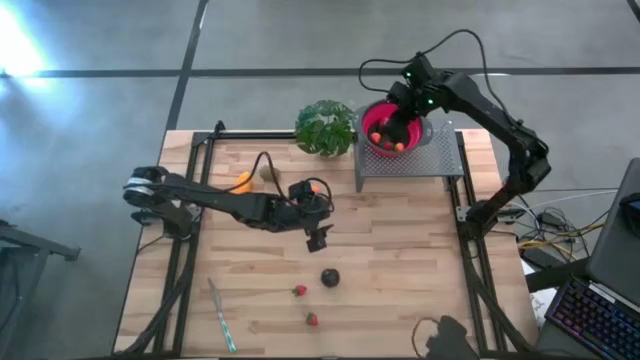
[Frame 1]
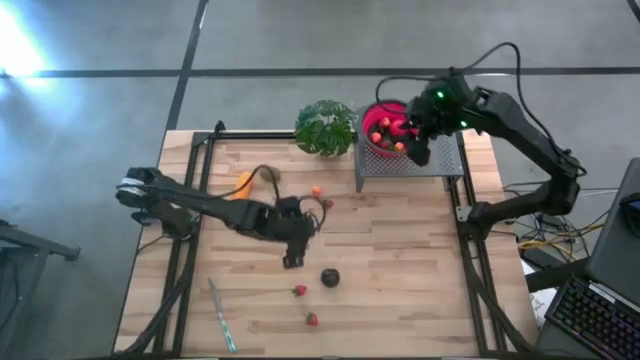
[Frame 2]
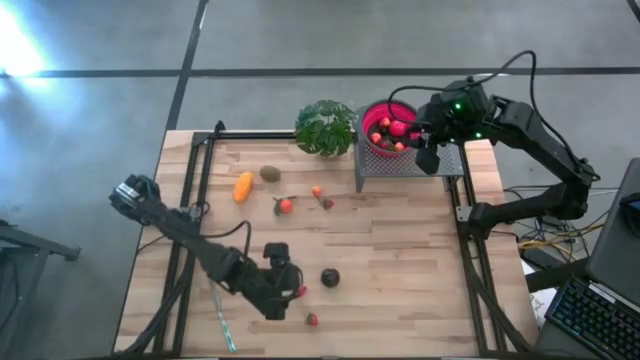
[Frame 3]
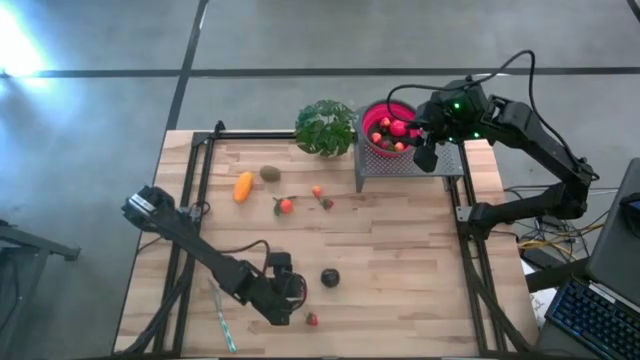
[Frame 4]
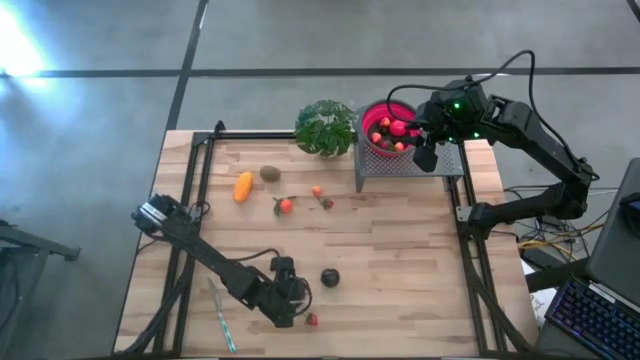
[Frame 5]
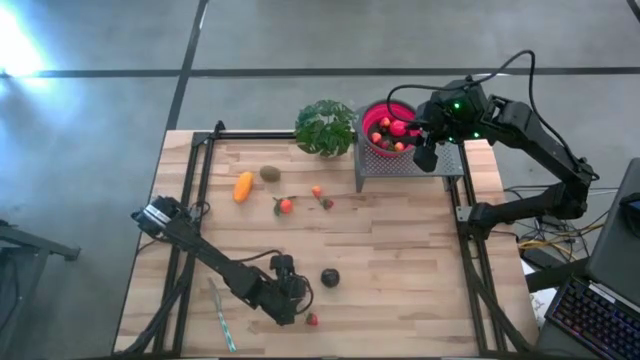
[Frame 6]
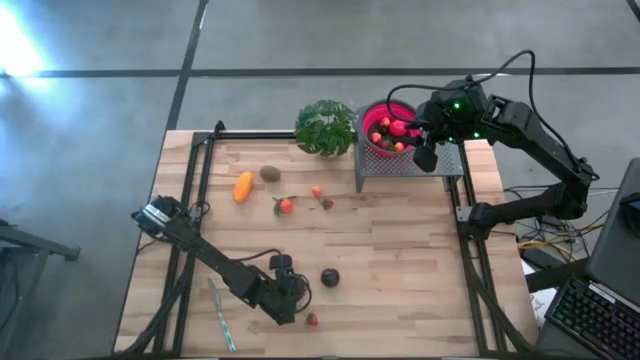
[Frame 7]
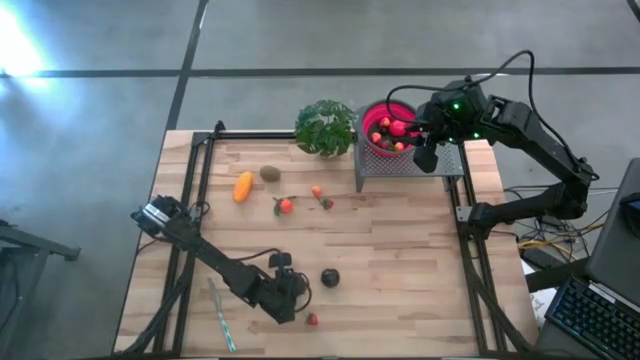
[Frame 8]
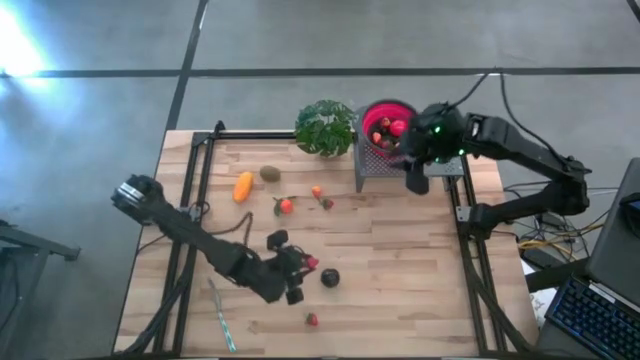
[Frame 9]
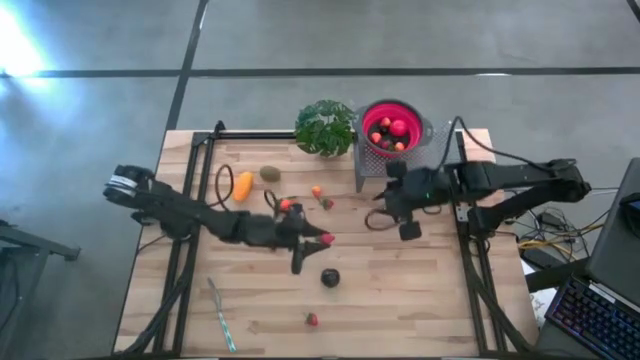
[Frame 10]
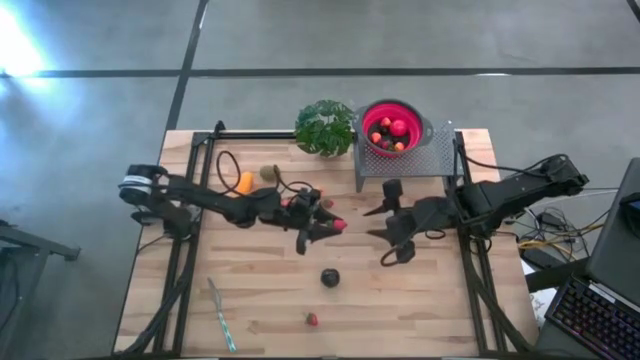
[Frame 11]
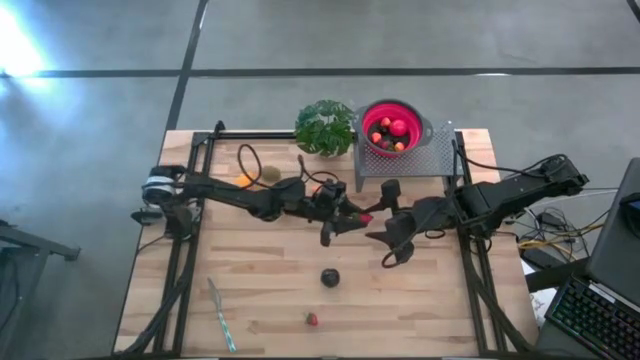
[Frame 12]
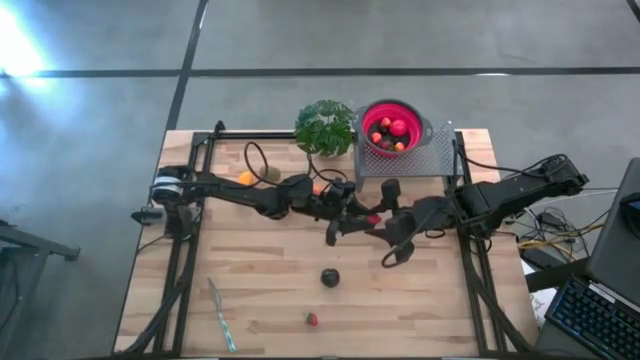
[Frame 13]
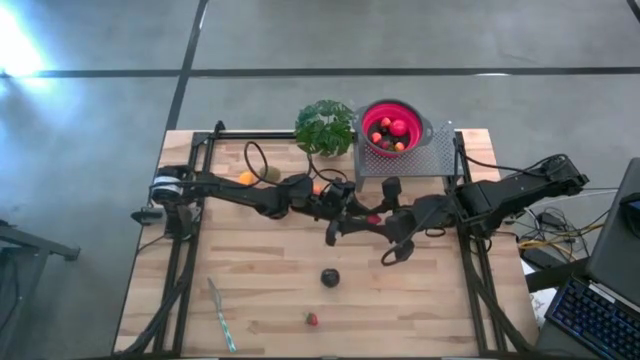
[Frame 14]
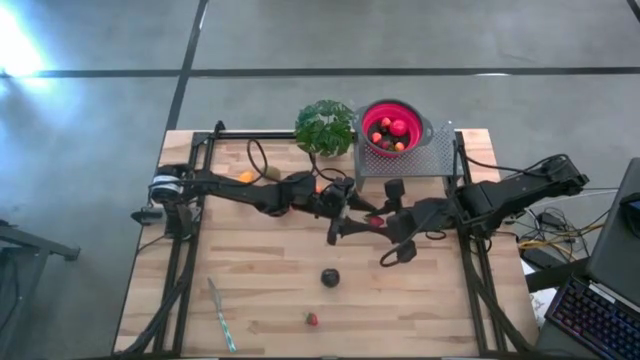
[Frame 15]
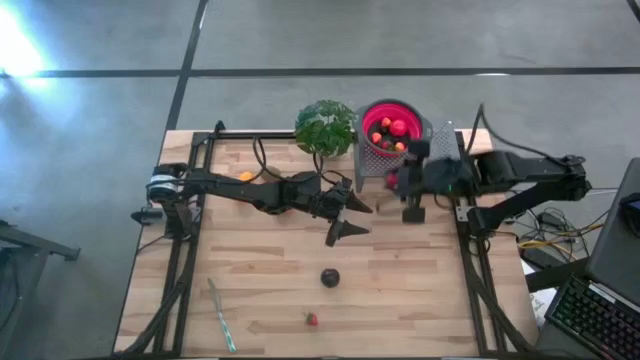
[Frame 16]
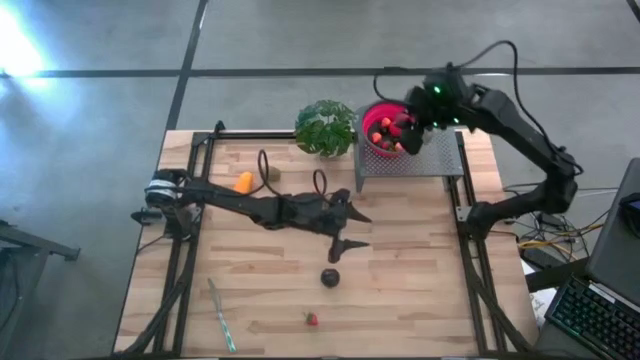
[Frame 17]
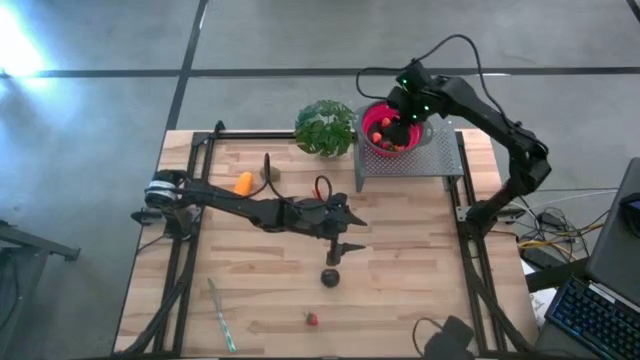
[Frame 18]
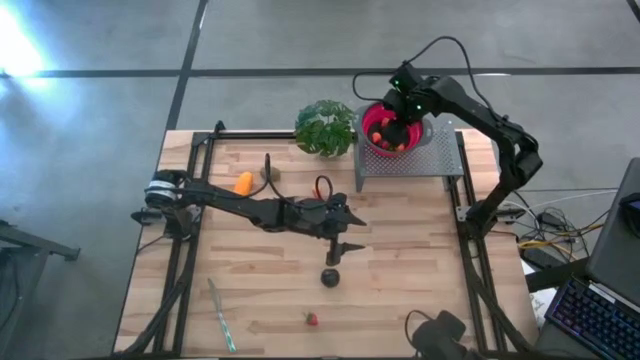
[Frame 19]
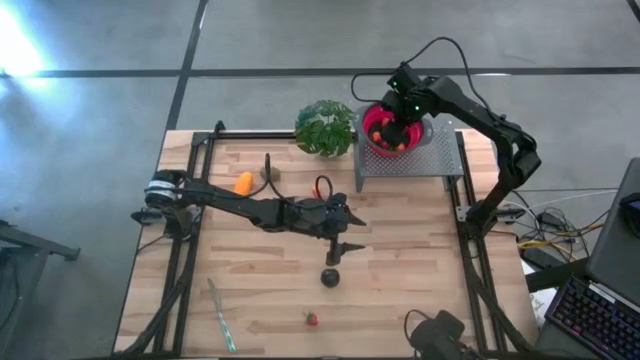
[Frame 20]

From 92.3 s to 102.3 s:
Task: Pick & Place Fruit
Put the strawberry into the red strainer bowl on the shelf

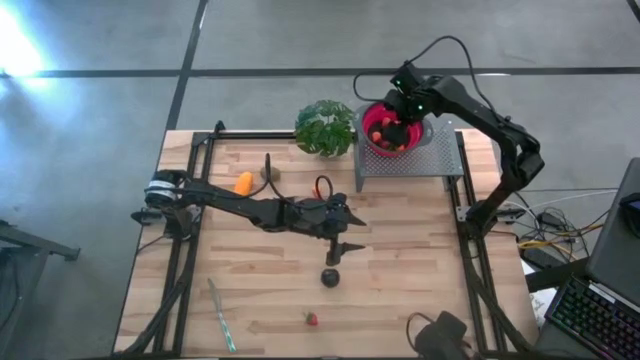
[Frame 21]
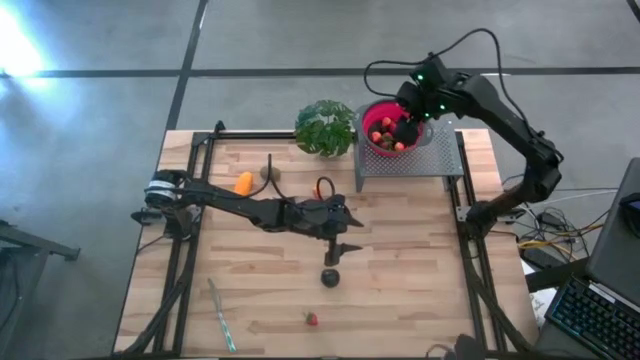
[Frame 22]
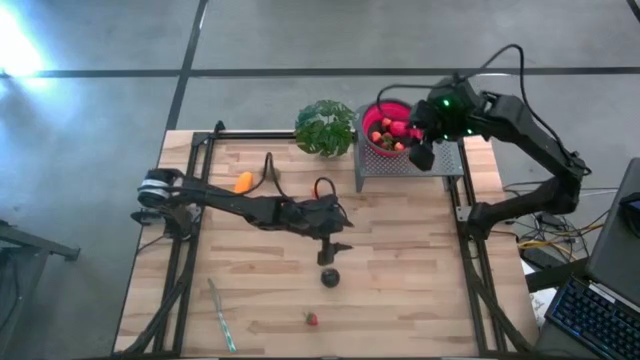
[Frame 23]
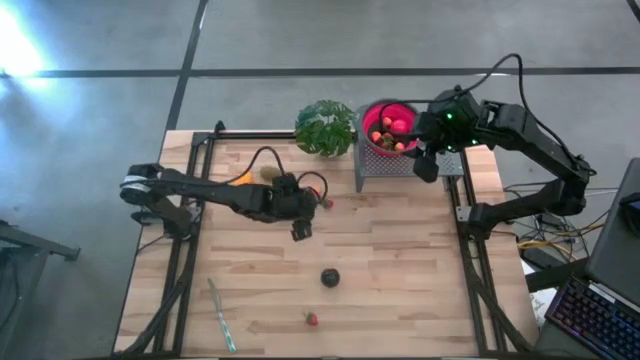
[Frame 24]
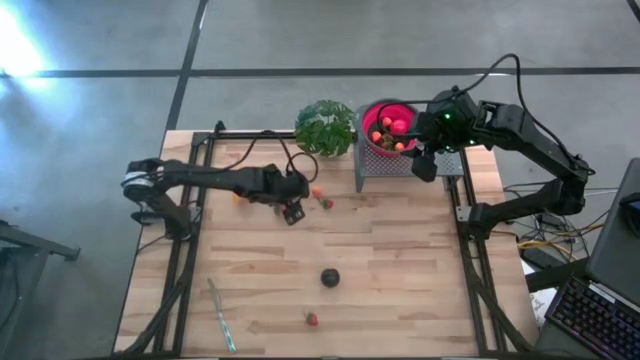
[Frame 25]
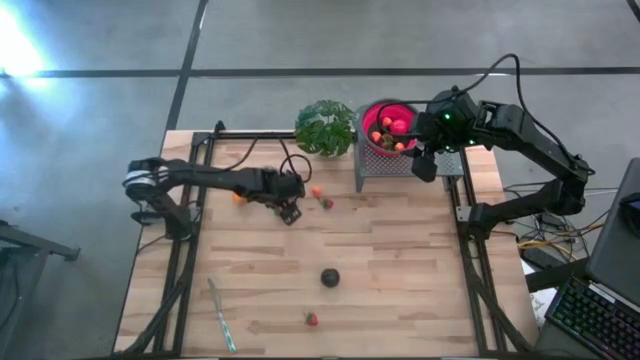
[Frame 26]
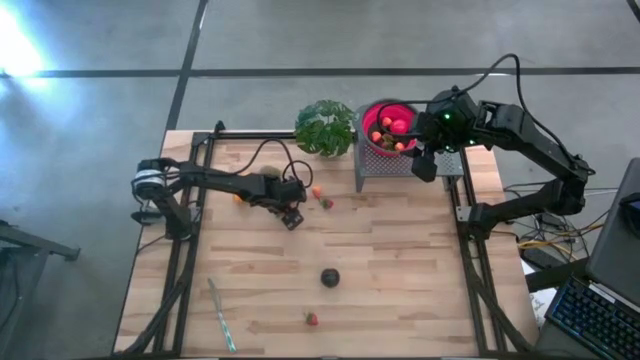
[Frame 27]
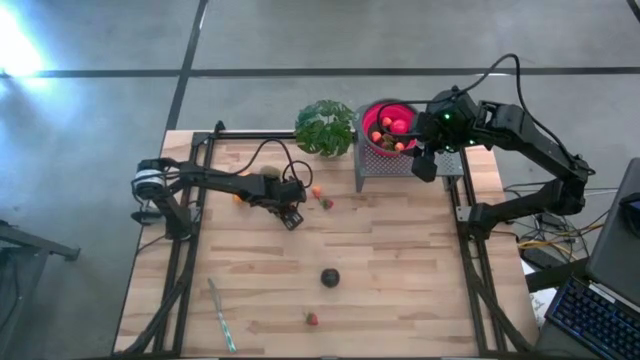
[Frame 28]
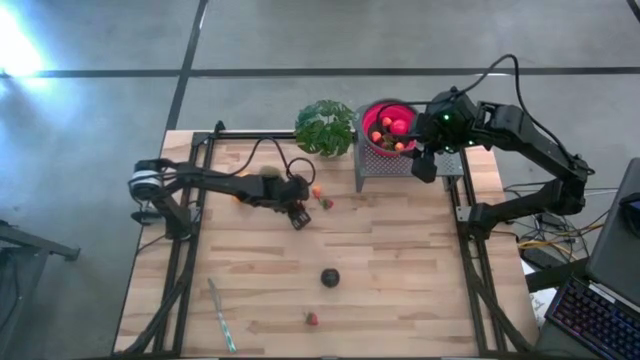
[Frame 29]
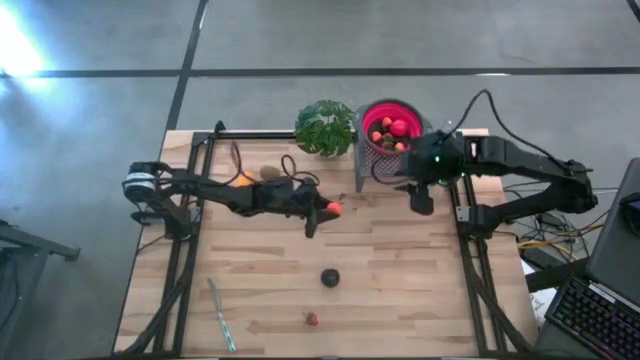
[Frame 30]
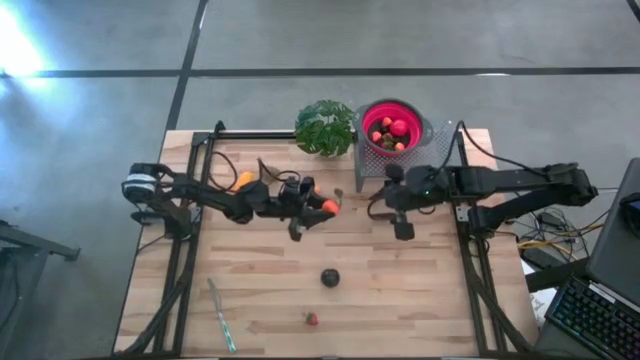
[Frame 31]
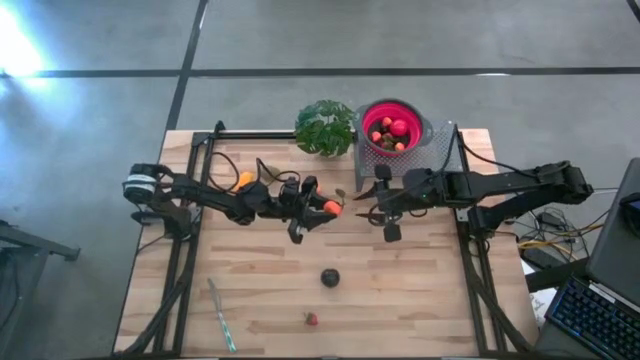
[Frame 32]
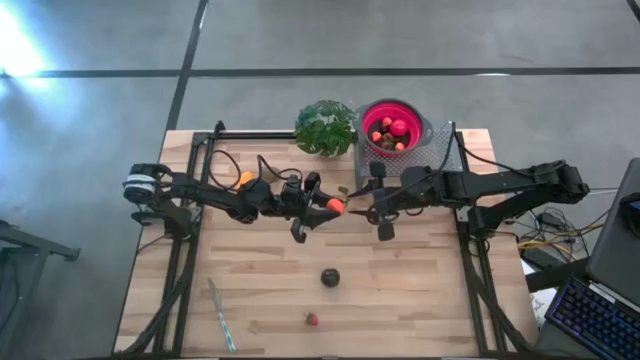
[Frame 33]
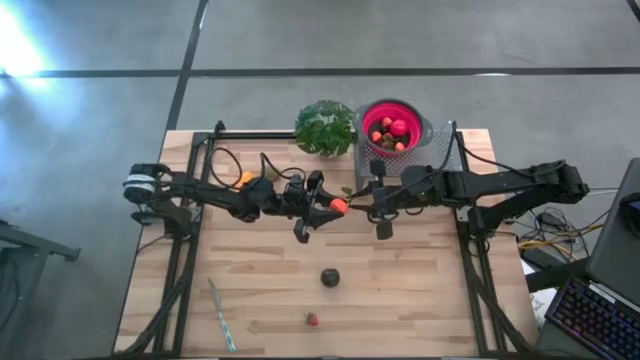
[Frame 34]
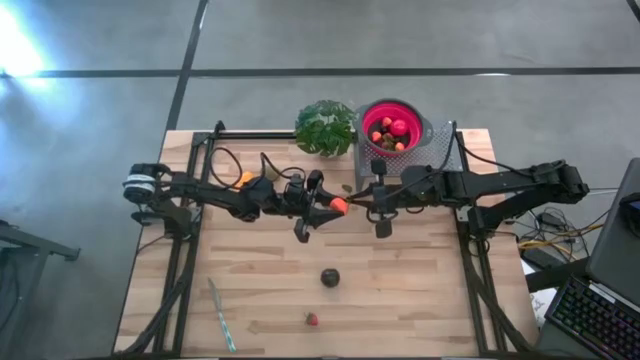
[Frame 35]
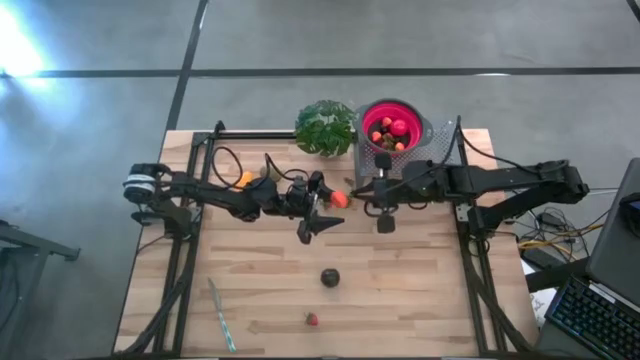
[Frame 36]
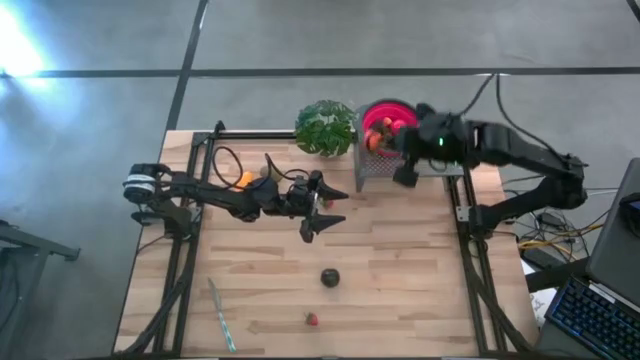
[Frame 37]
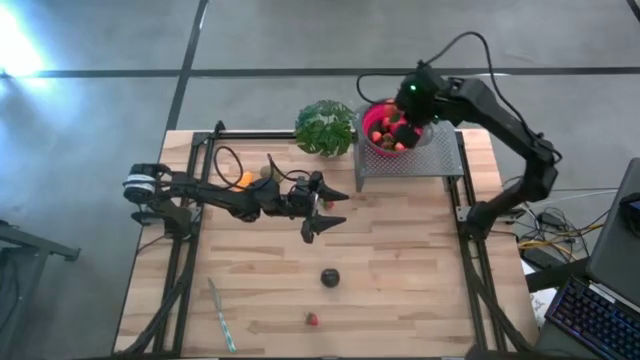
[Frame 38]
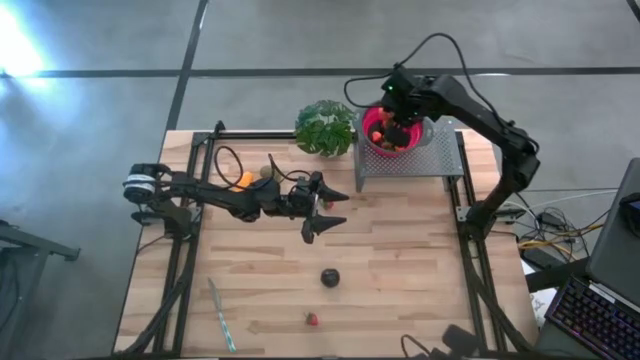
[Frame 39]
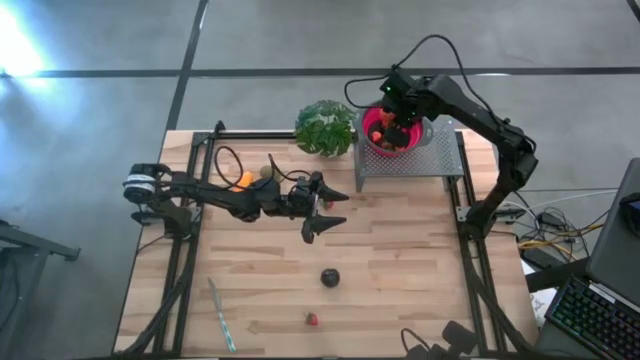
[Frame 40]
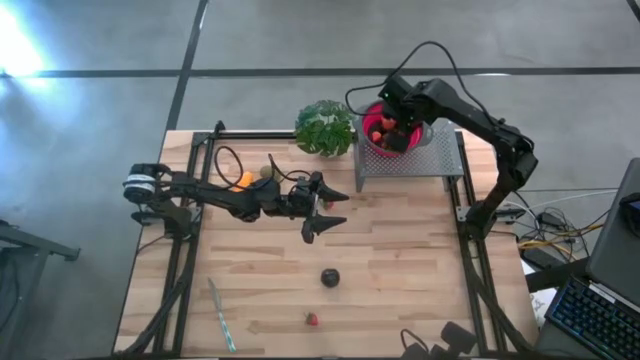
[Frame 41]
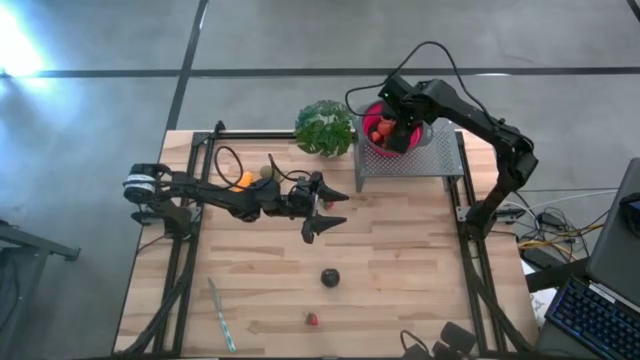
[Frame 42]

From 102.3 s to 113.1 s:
Put the orange into the red strainer bowl on the shelf
